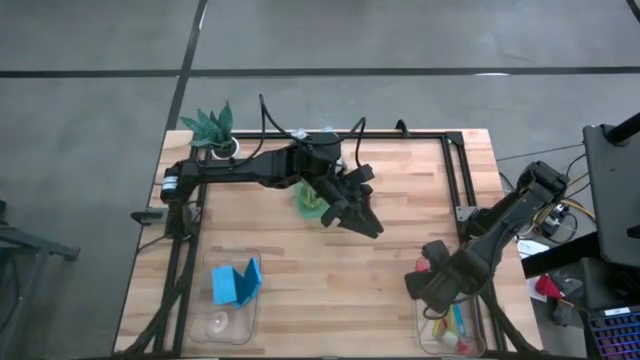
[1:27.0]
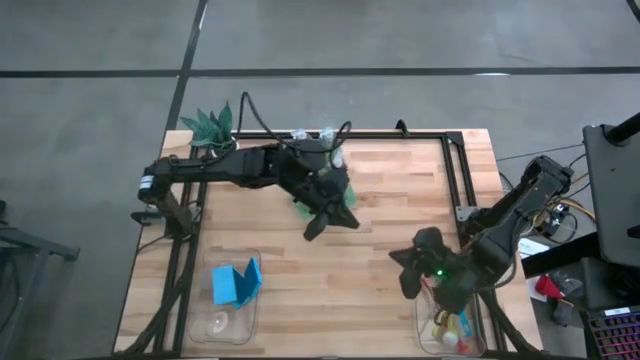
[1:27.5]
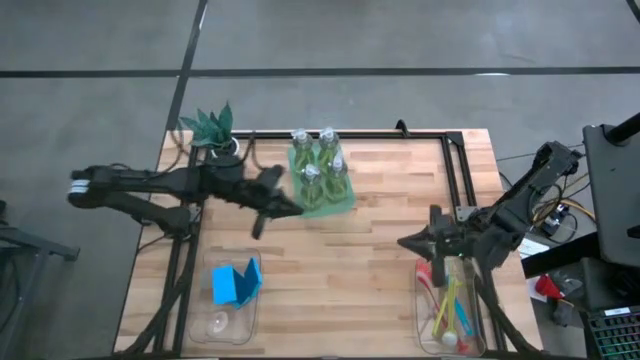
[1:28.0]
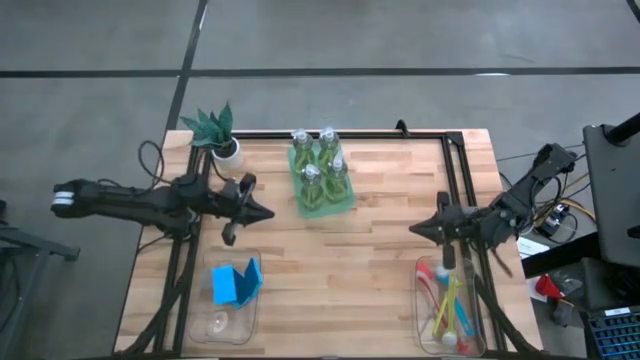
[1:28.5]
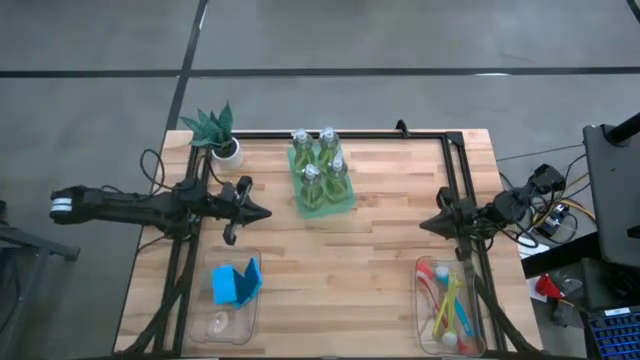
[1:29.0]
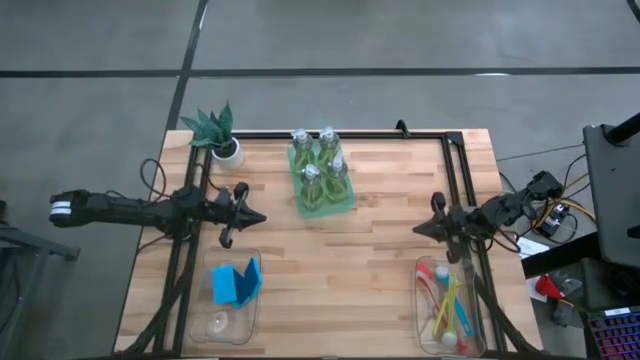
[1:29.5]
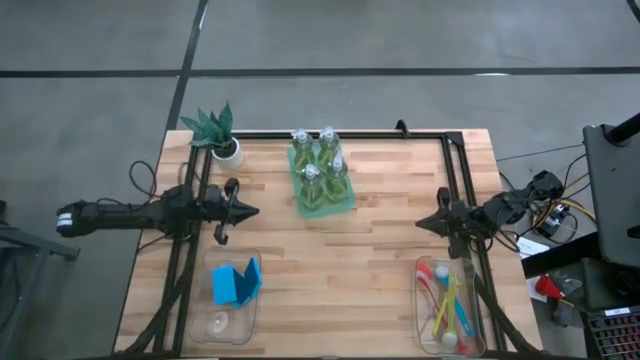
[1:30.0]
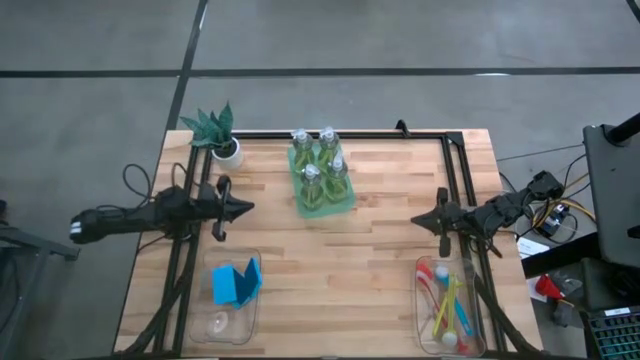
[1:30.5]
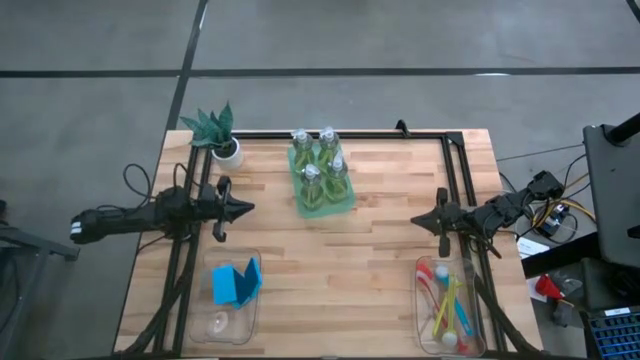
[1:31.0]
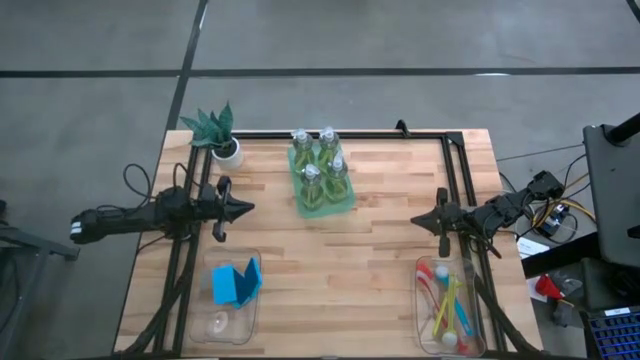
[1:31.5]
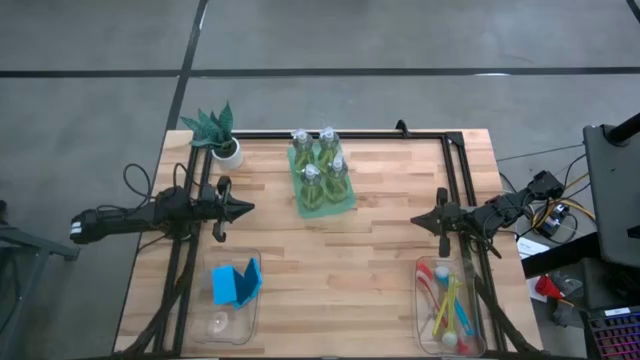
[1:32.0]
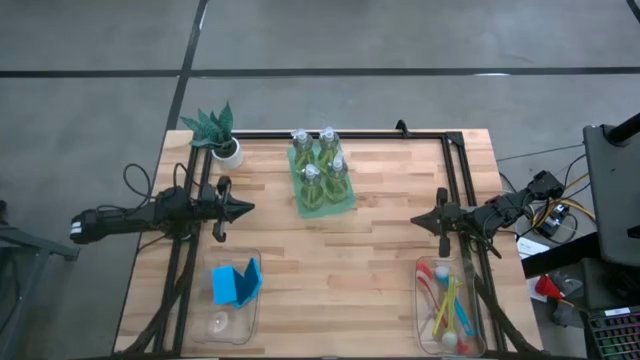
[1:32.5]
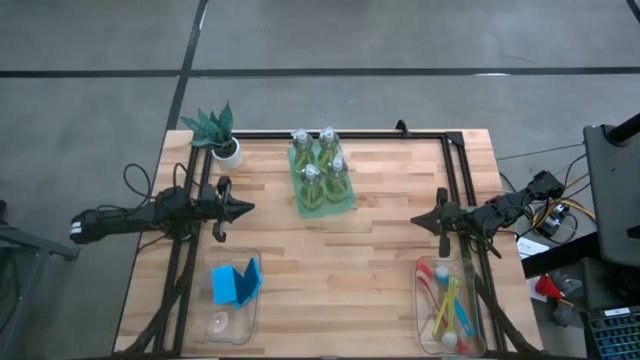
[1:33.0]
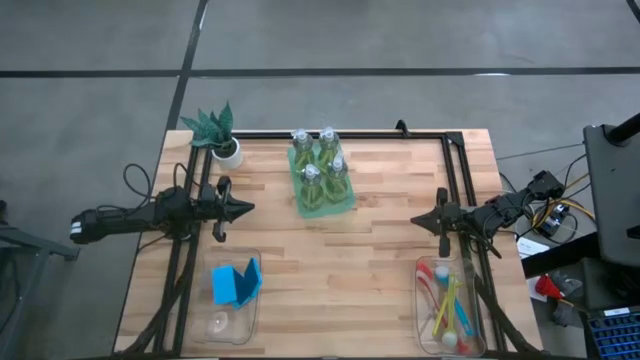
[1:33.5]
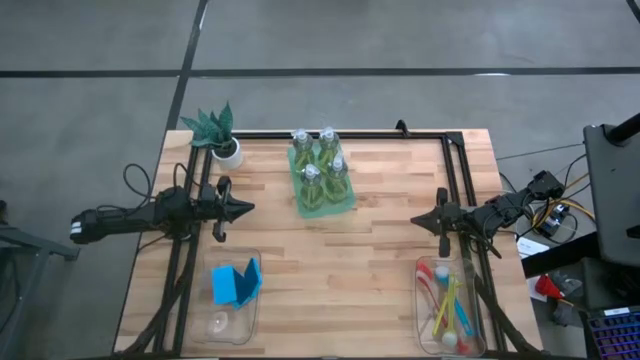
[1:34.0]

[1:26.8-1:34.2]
Task: Pick & Place Kitchen Sink Supplies
Return to Home Position

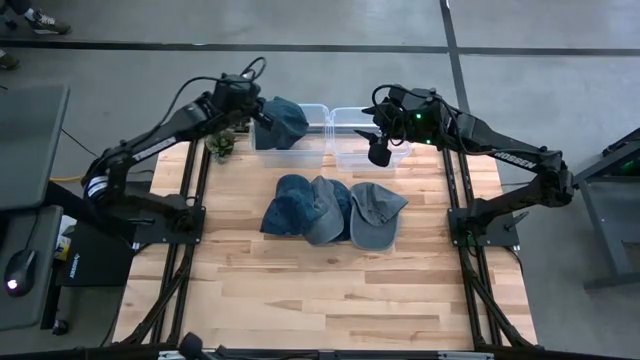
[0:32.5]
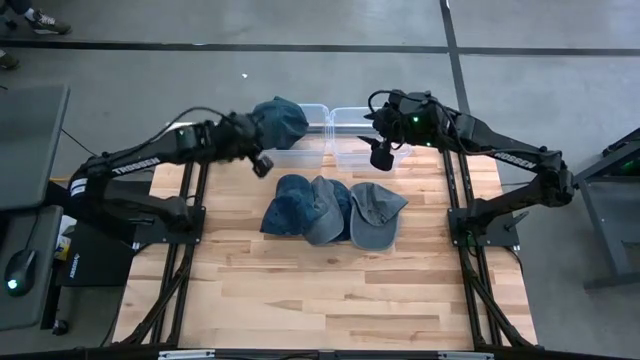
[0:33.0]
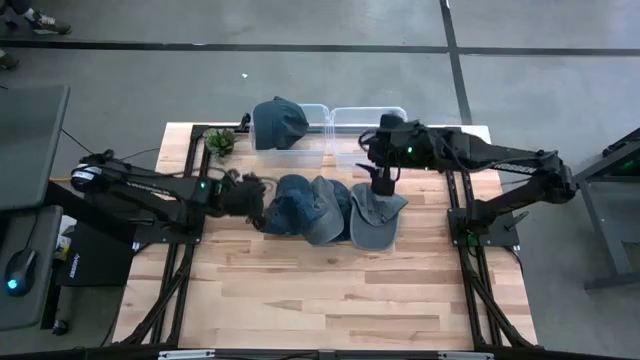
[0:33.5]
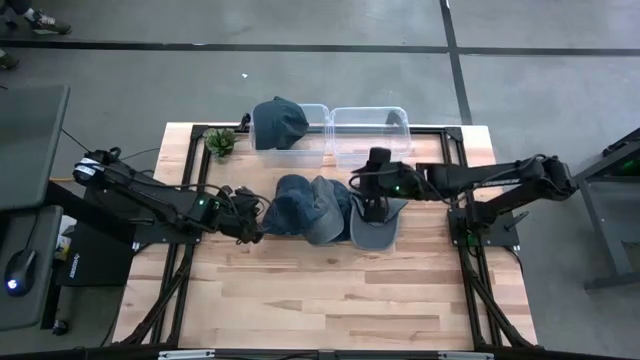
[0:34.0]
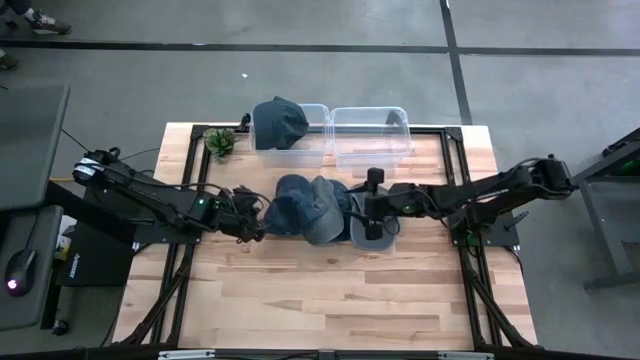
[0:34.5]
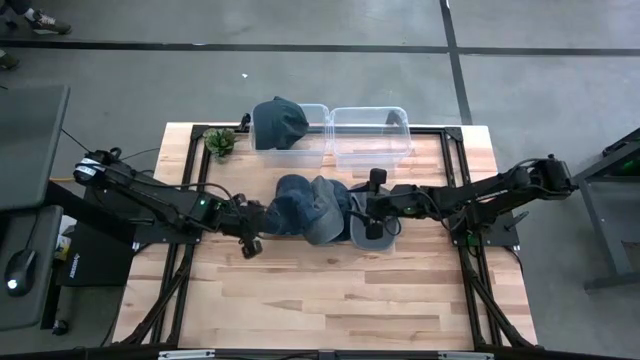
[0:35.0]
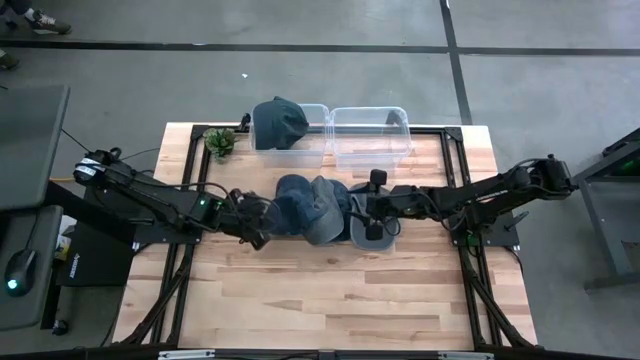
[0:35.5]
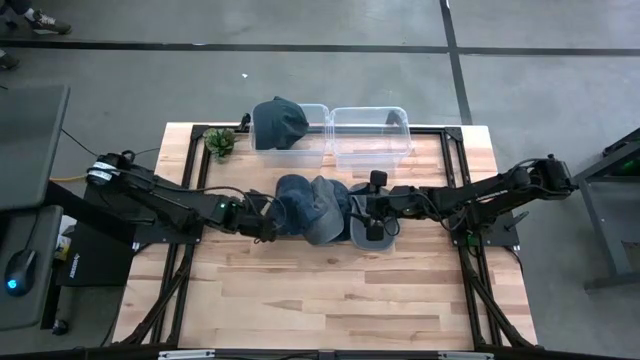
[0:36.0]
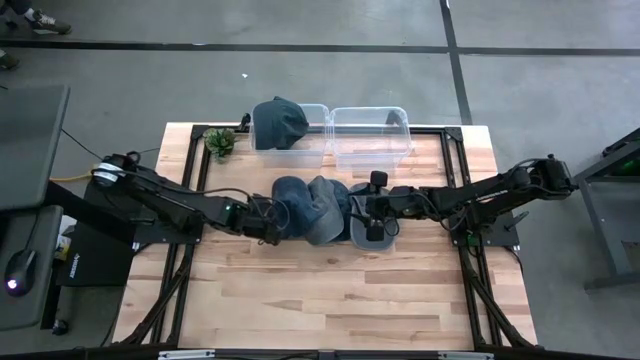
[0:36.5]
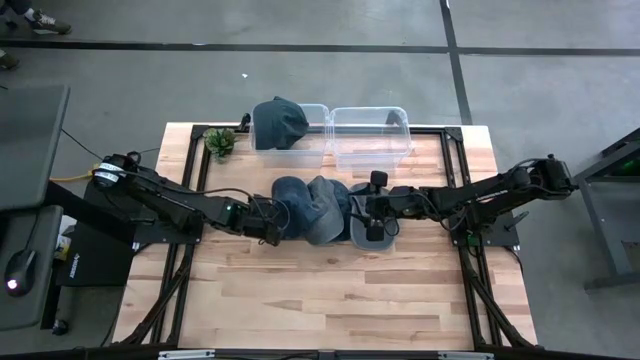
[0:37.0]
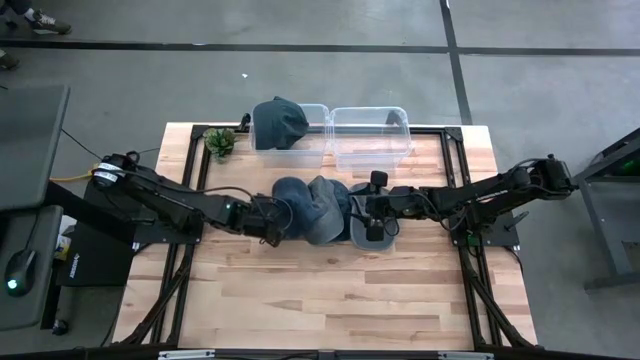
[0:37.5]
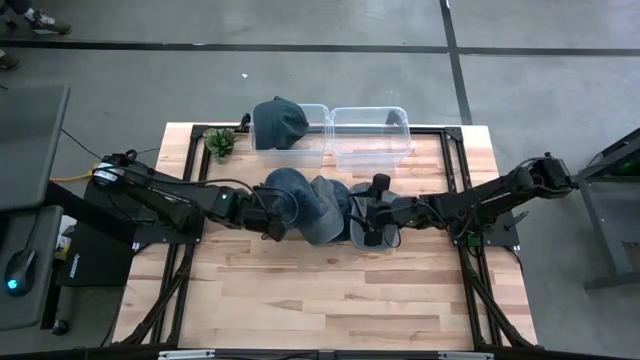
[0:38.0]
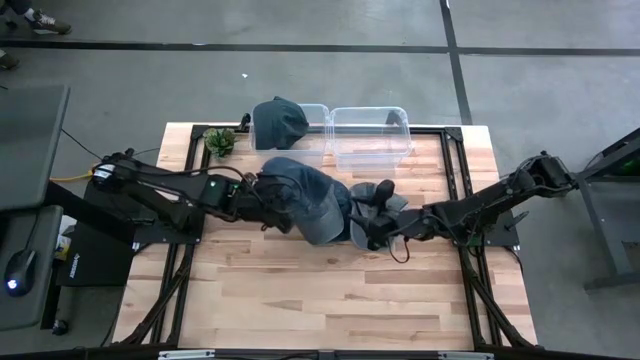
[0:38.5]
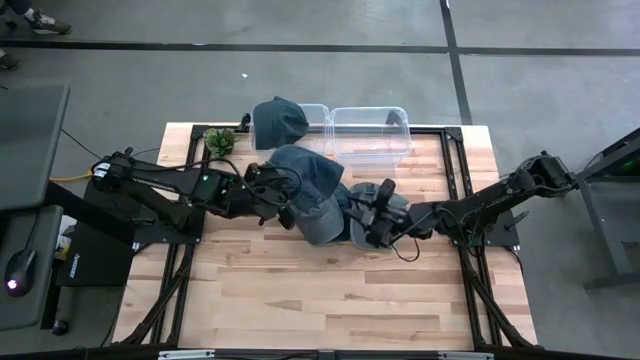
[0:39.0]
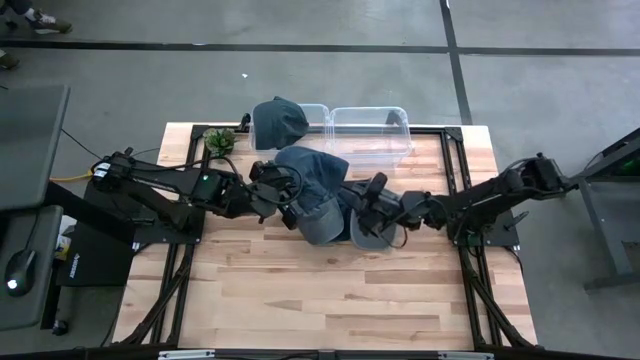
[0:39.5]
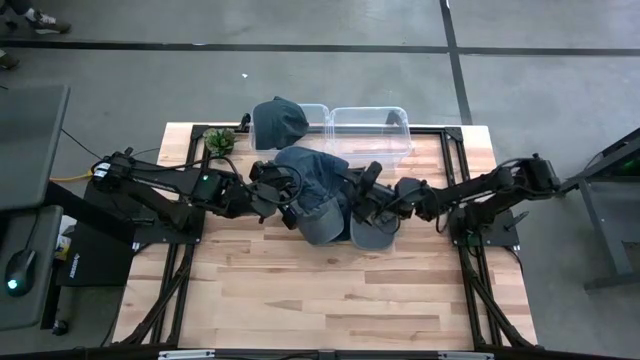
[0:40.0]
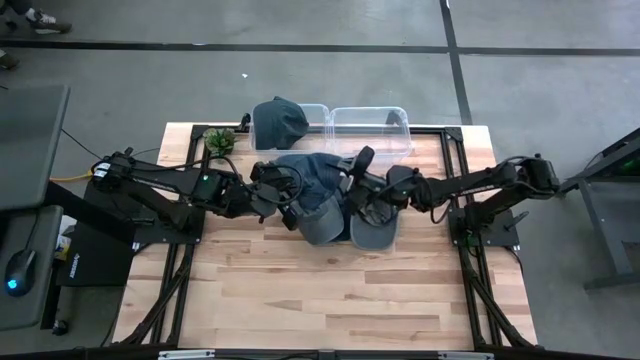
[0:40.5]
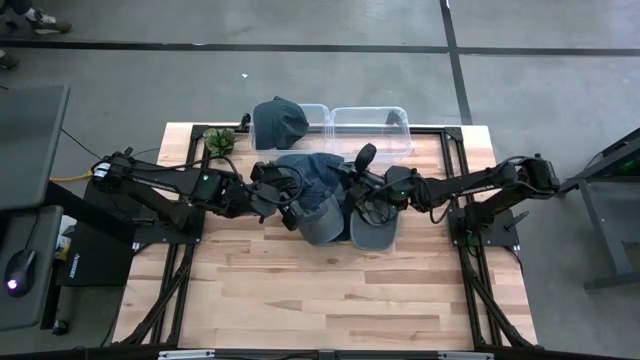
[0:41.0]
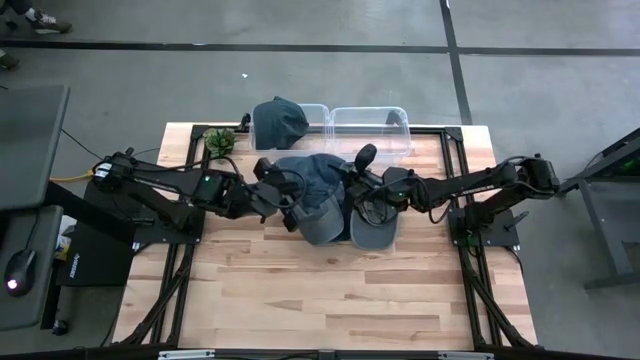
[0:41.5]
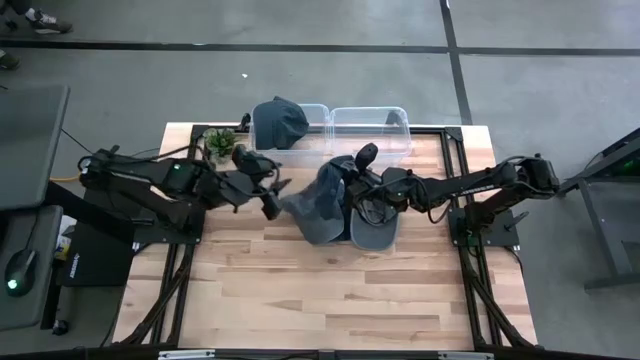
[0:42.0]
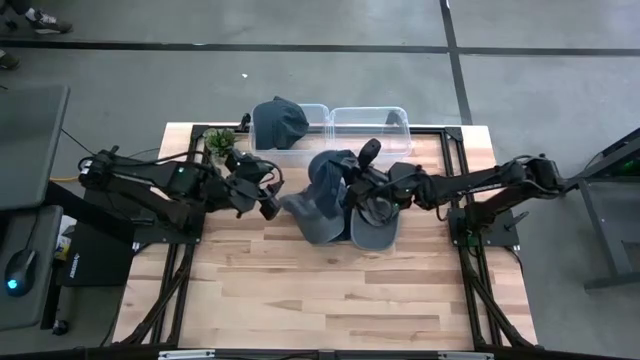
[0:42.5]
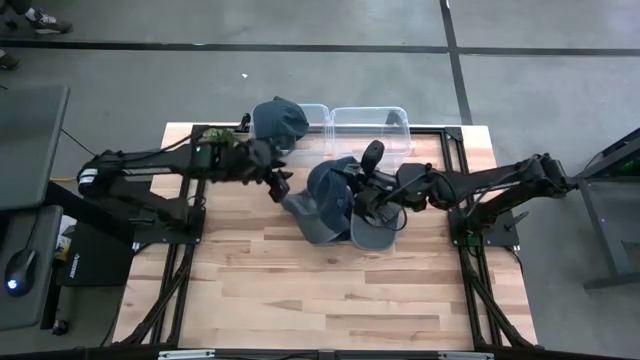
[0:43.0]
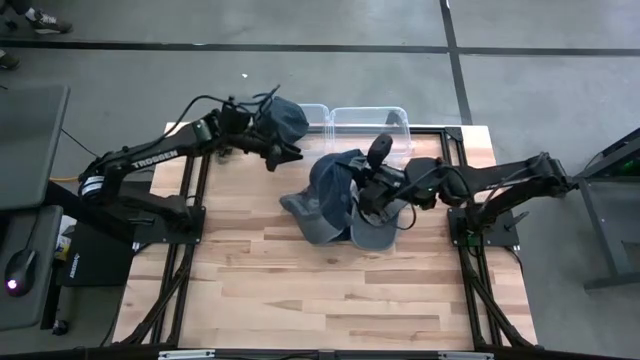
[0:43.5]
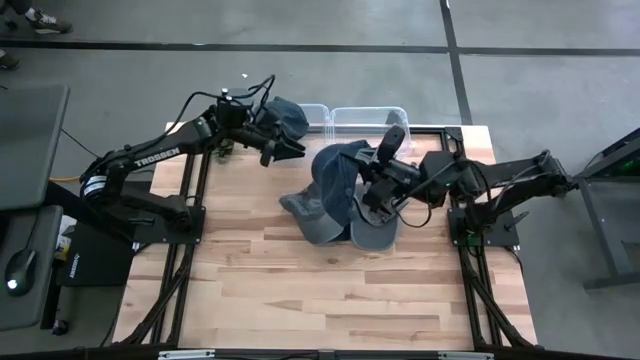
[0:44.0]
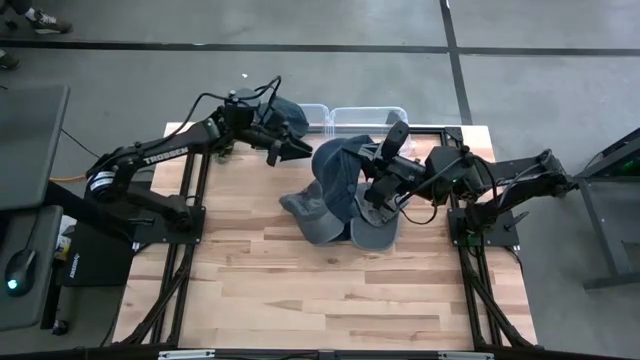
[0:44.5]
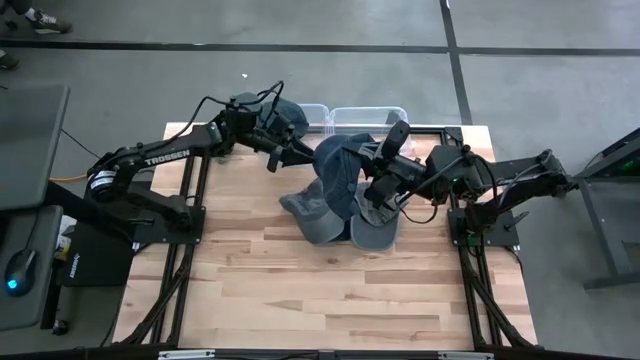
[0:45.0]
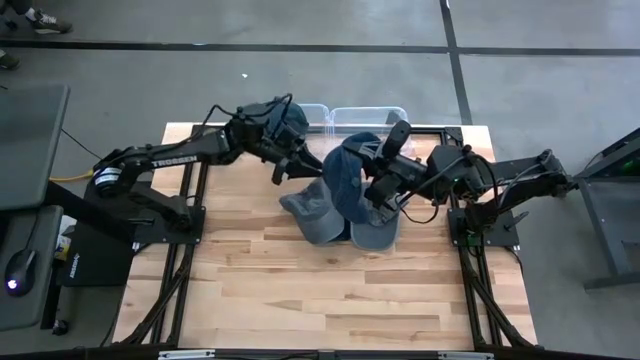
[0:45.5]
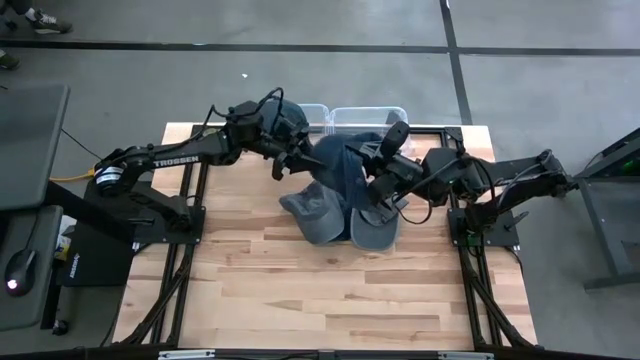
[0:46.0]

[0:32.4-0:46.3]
Task: Pick & Place hat
Put the middle left blue cap into the left transparent bin
